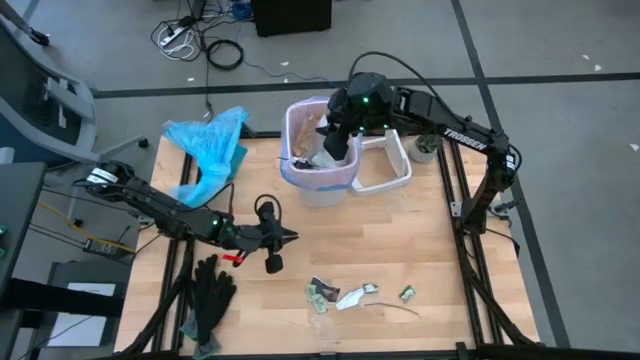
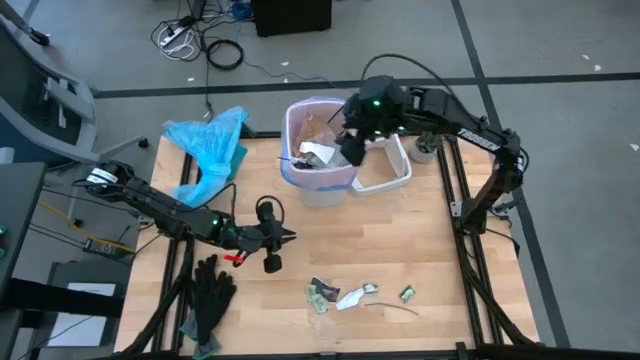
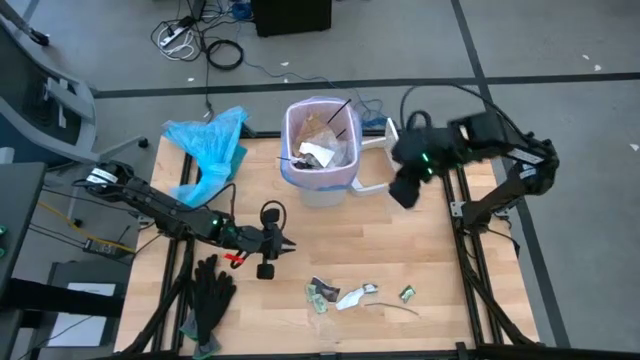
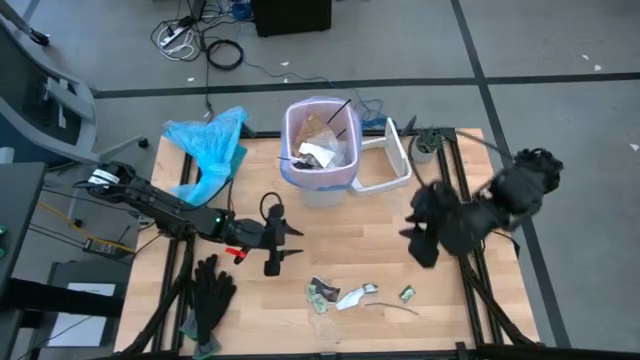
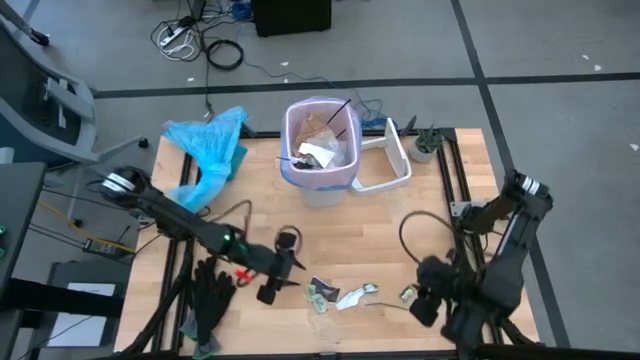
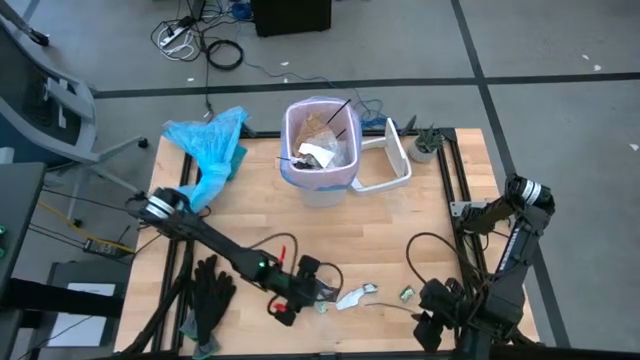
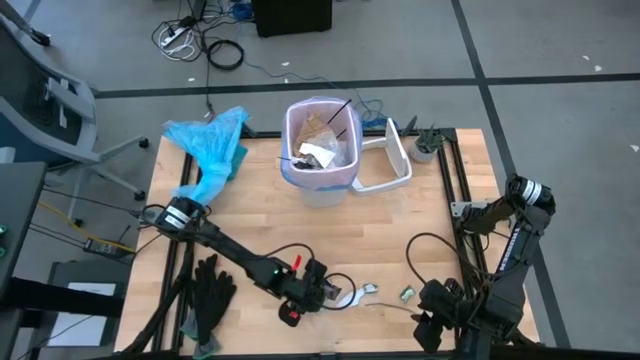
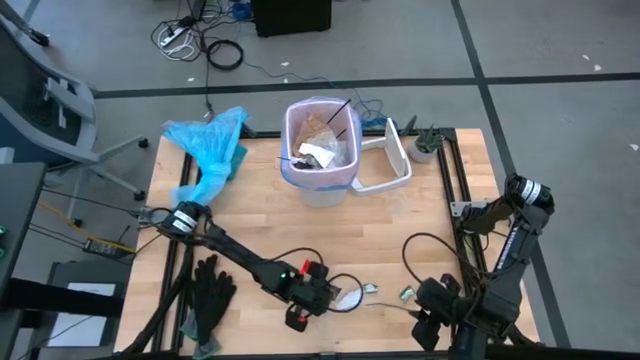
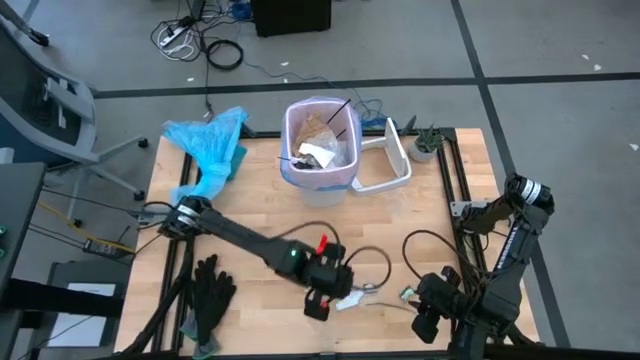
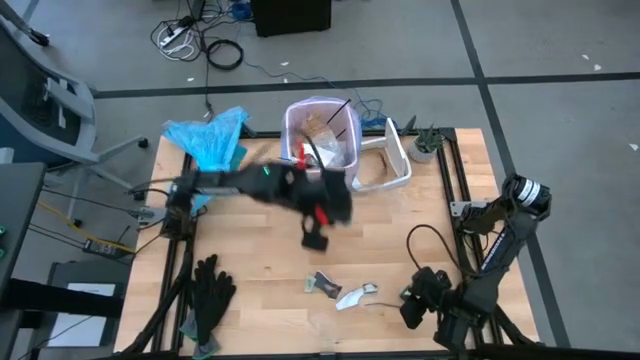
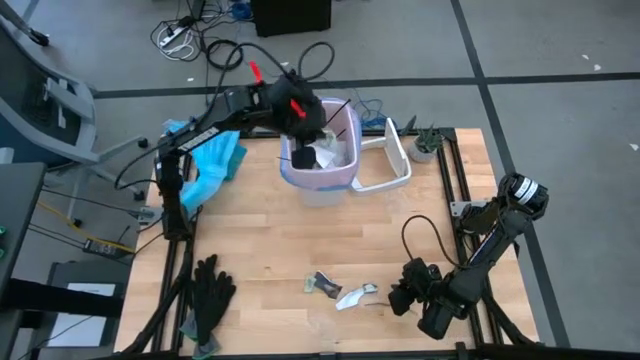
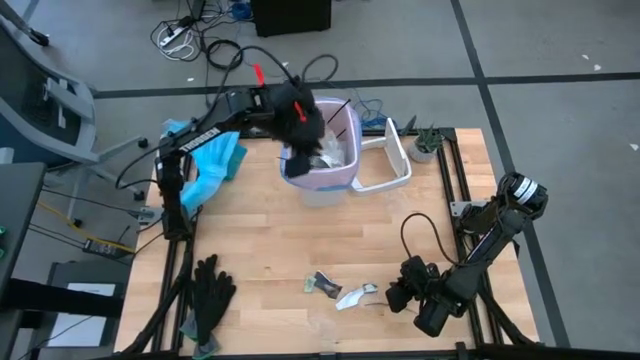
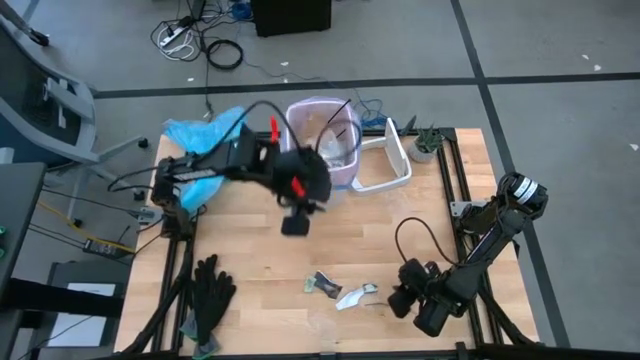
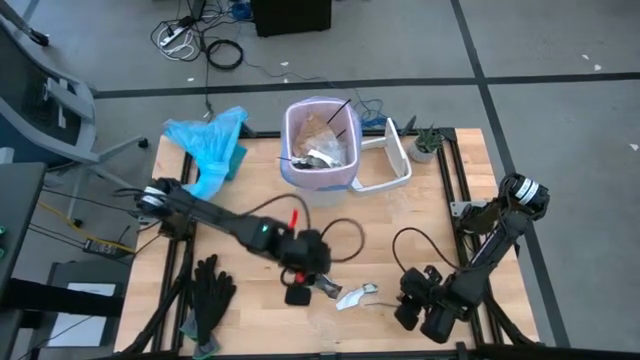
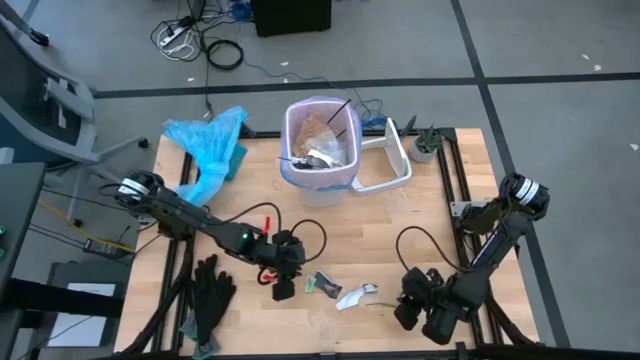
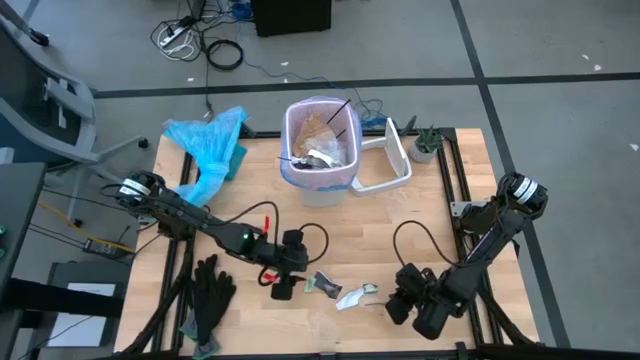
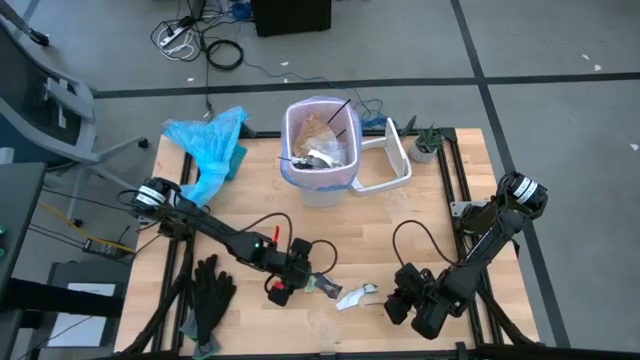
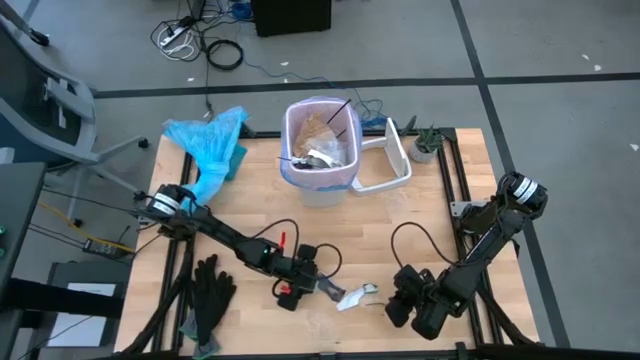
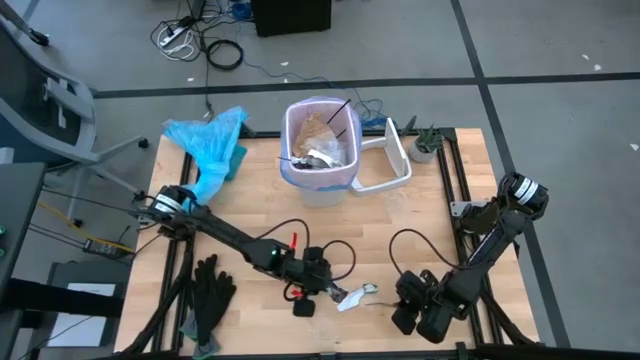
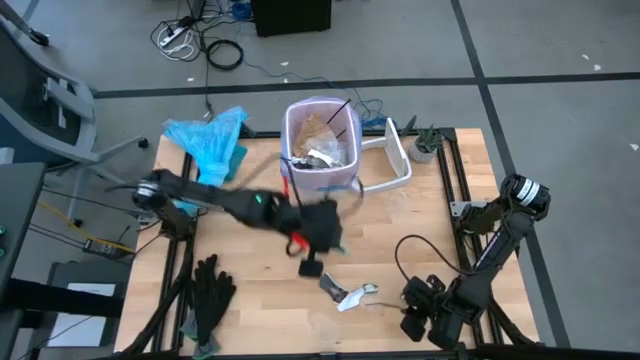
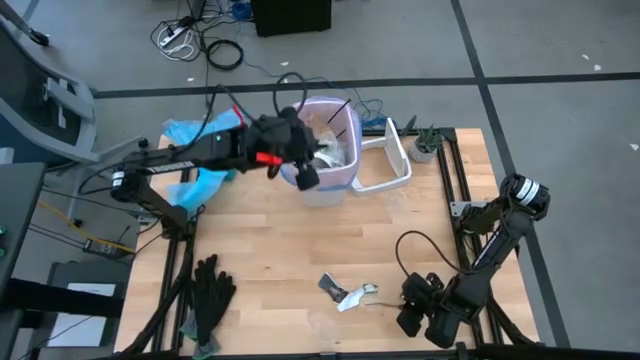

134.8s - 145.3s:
Task: place trash/remove bag and relplace
Put the light green plastic material into the trash bin

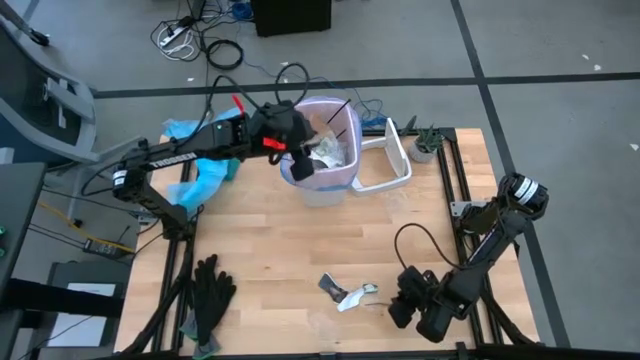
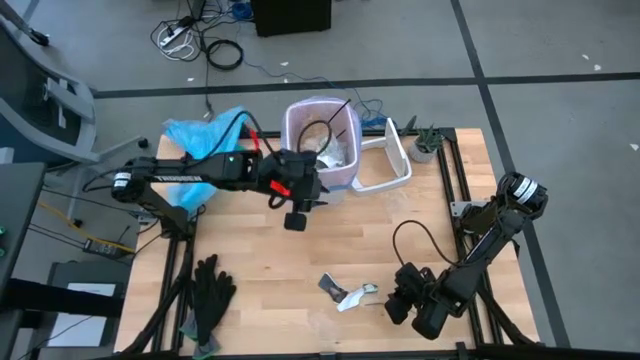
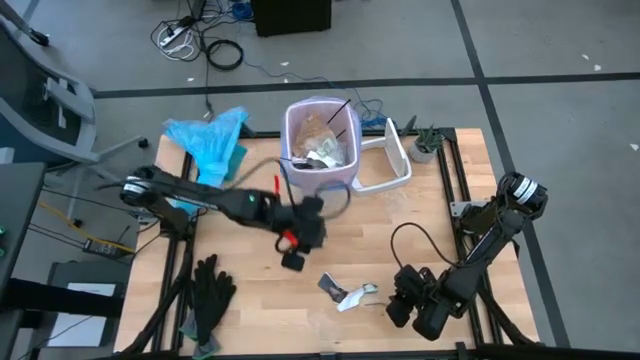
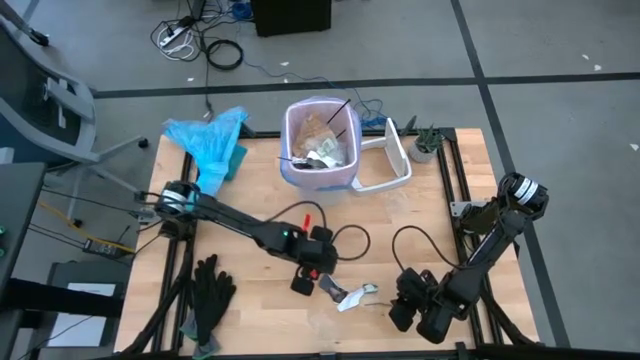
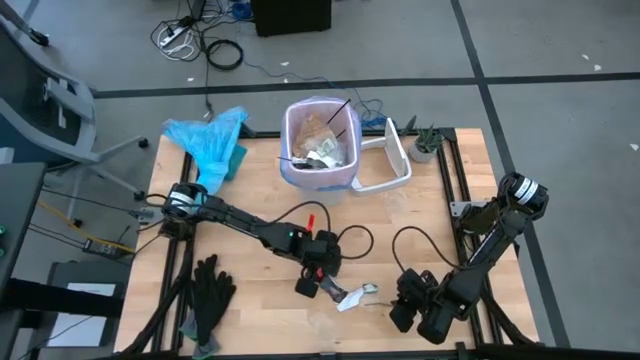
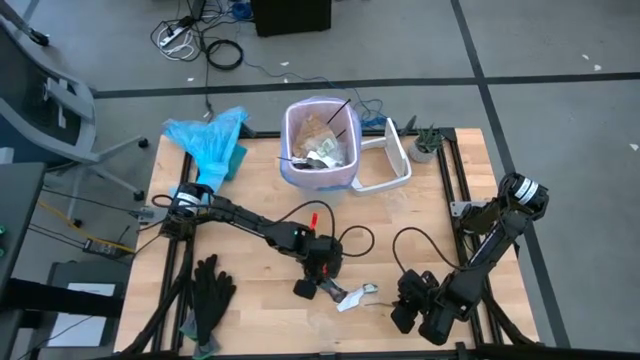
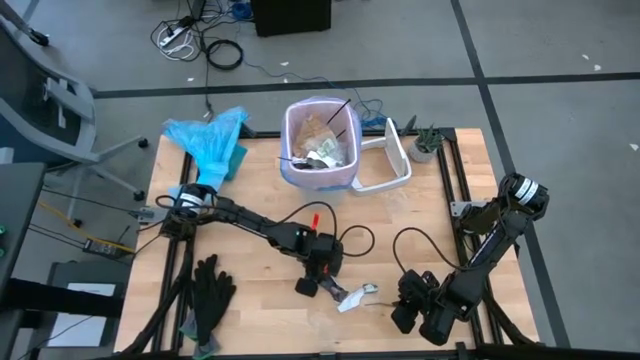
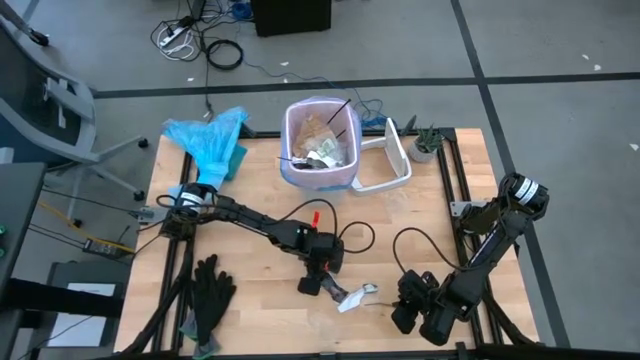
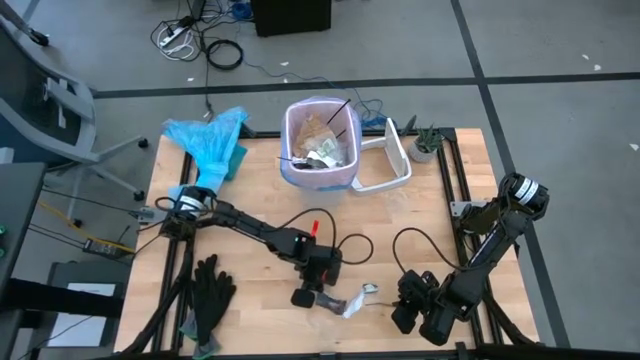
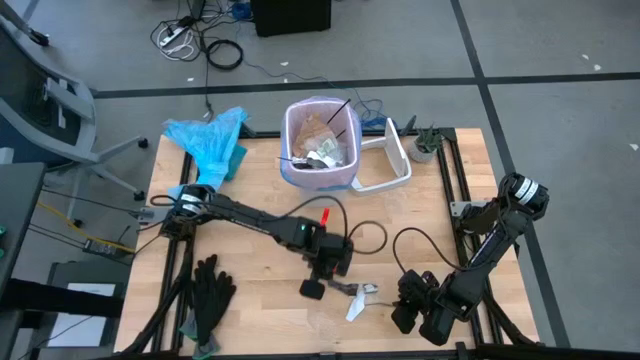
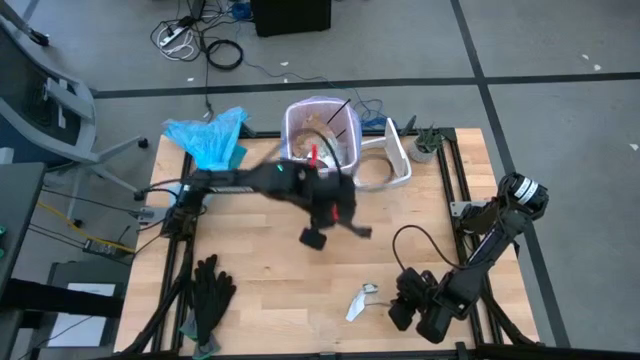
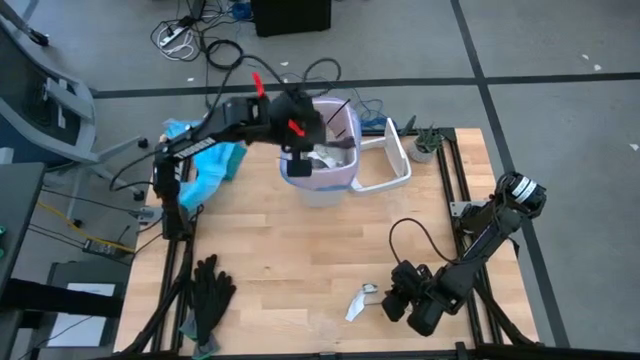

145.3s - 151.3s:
Put the black paper into the trash bin

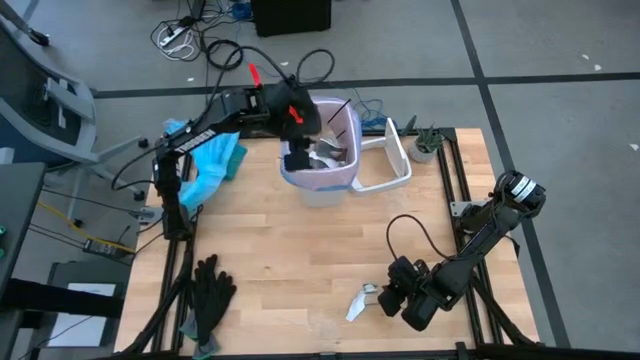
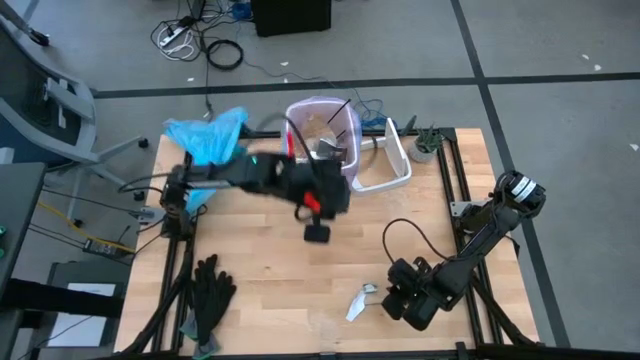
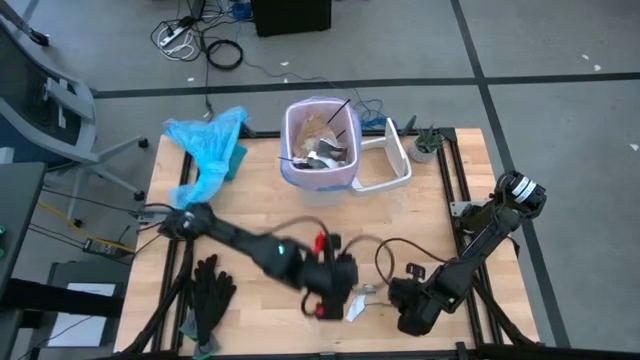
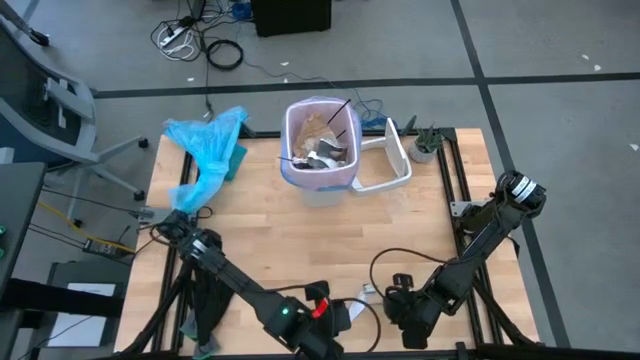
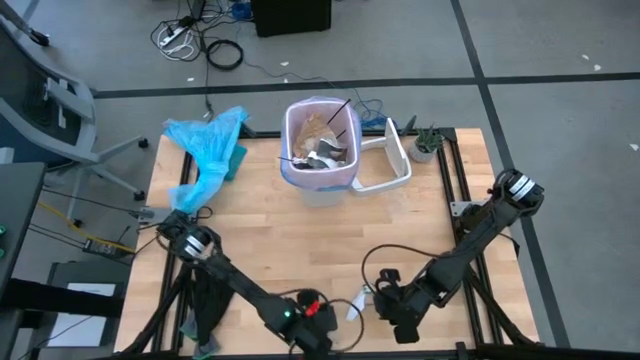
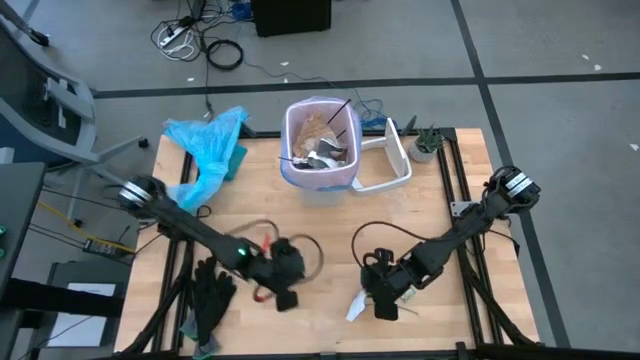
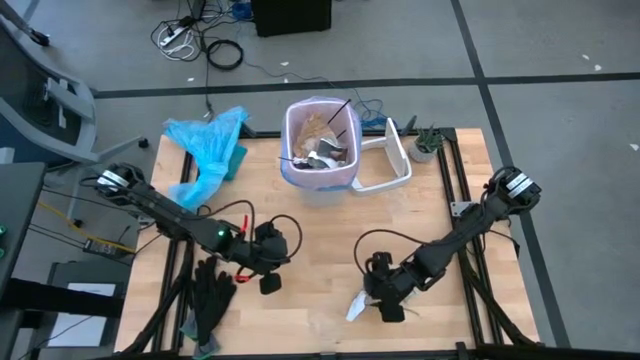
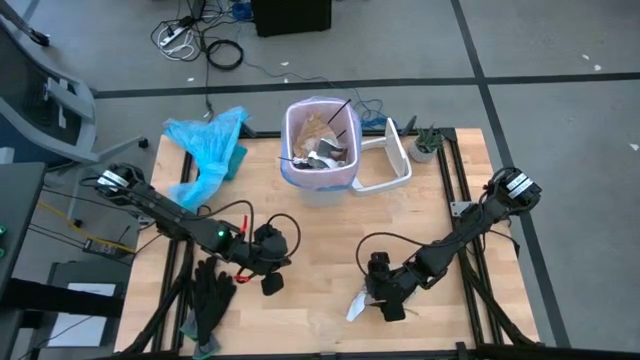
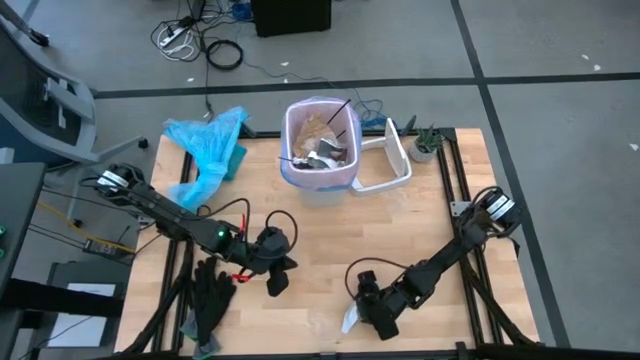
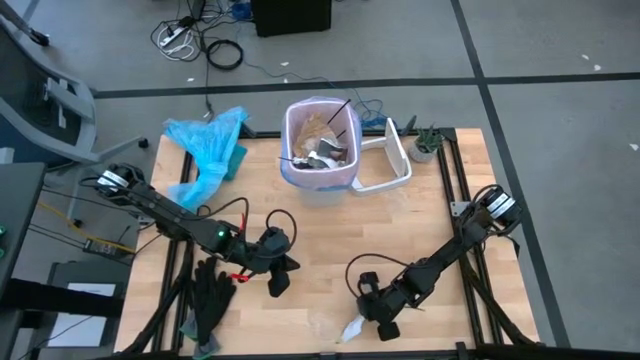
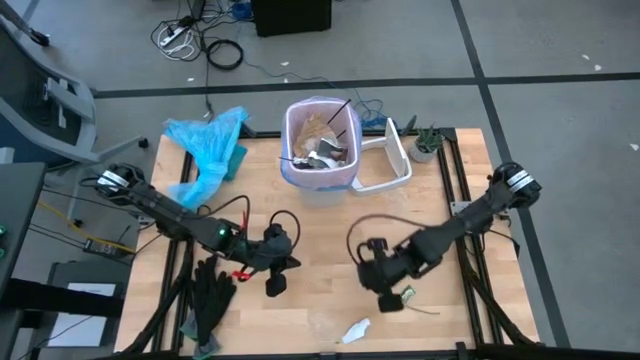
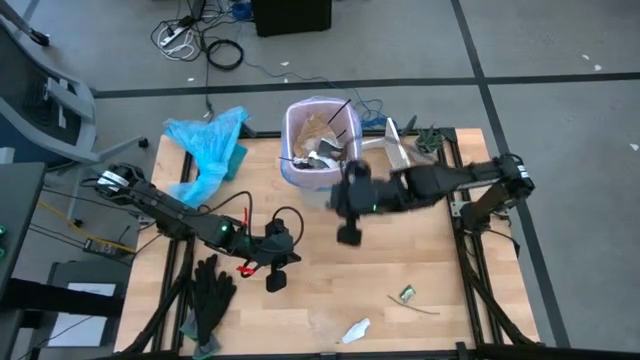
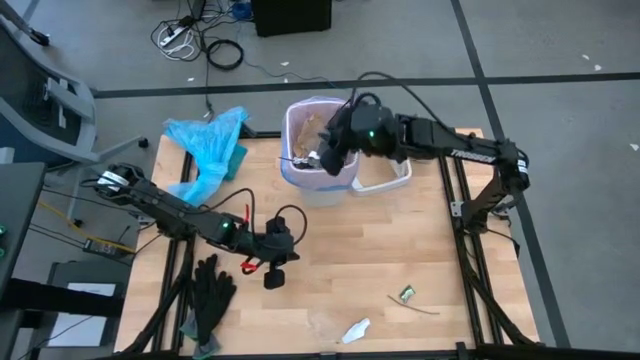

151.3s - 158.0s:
Put the clear cellophane and left green plastic material into the trash bin
